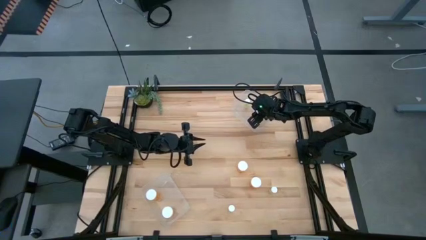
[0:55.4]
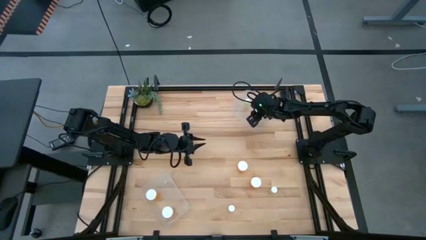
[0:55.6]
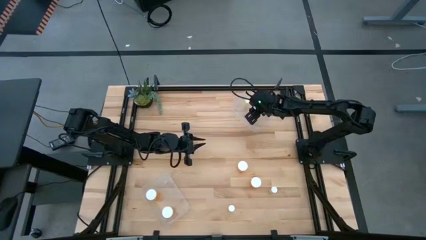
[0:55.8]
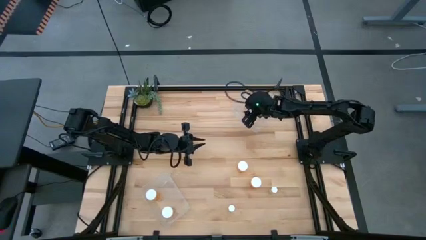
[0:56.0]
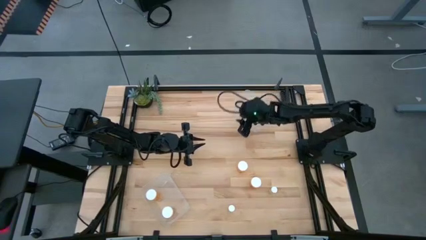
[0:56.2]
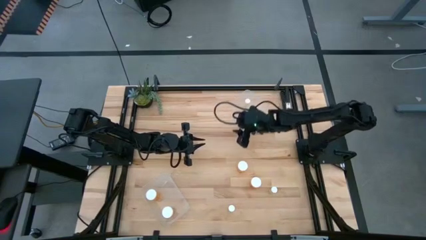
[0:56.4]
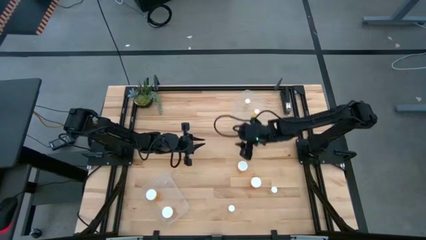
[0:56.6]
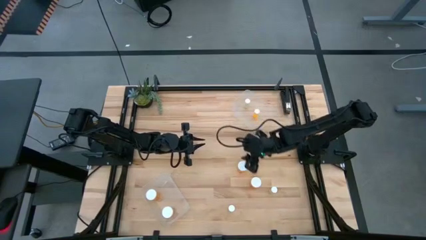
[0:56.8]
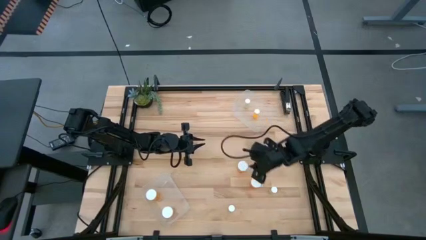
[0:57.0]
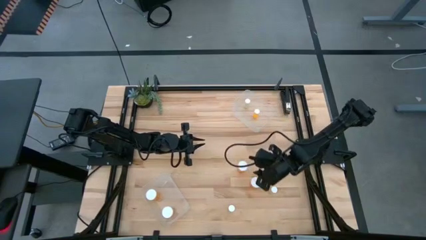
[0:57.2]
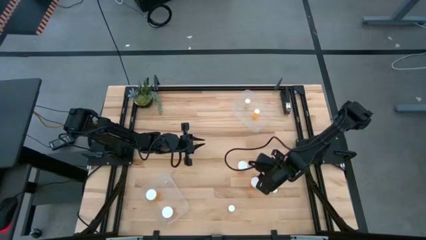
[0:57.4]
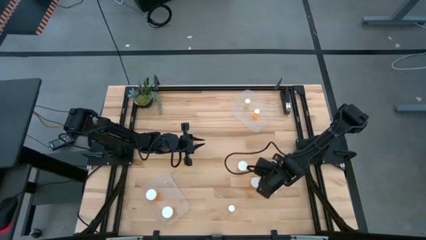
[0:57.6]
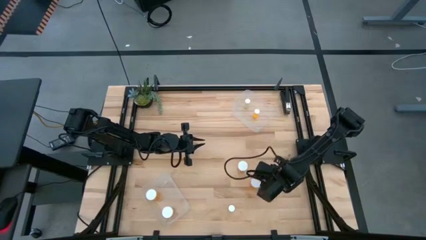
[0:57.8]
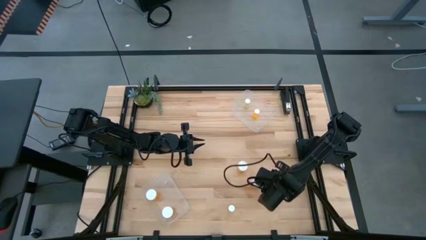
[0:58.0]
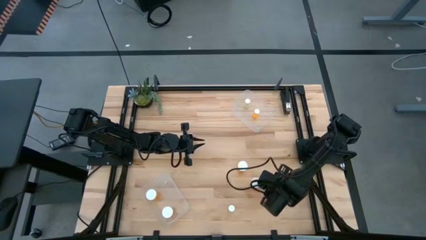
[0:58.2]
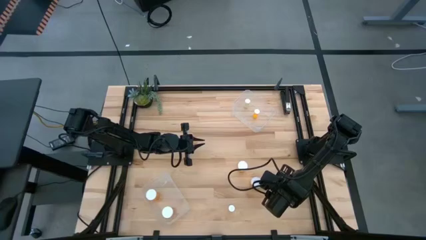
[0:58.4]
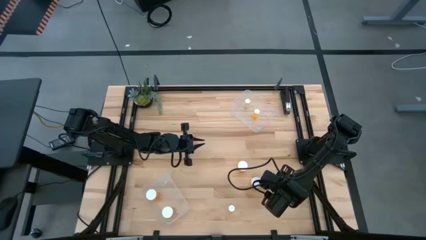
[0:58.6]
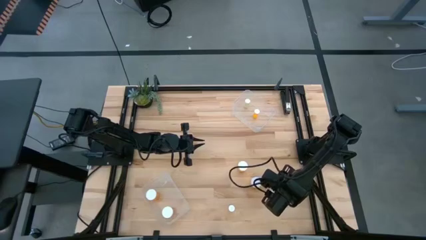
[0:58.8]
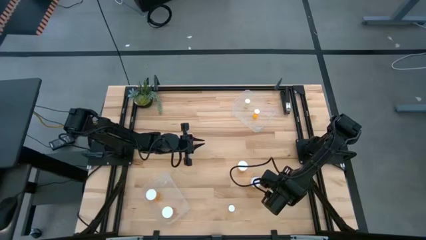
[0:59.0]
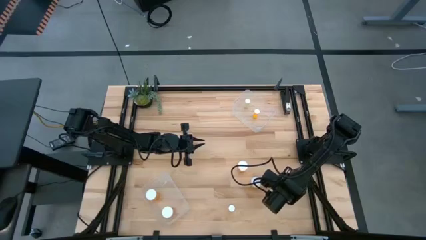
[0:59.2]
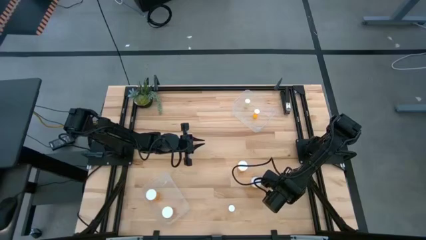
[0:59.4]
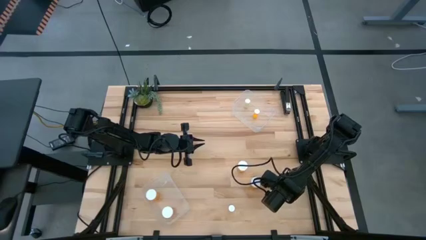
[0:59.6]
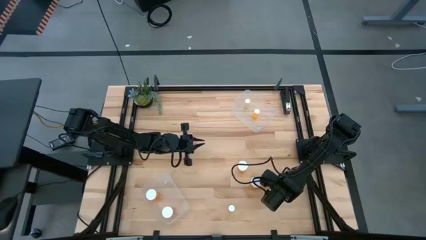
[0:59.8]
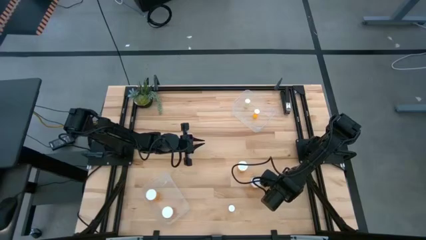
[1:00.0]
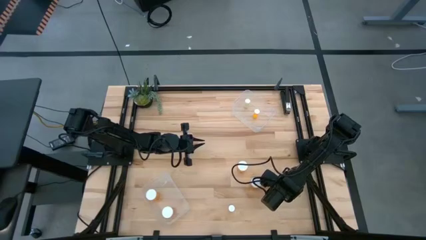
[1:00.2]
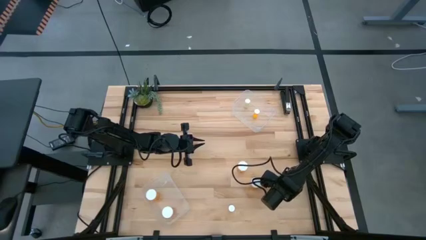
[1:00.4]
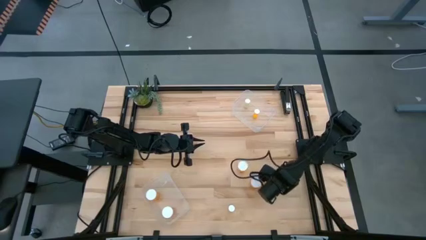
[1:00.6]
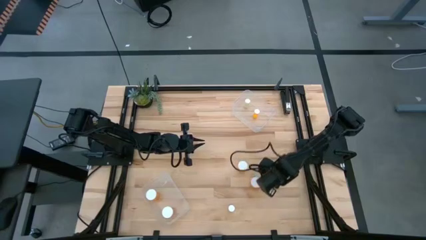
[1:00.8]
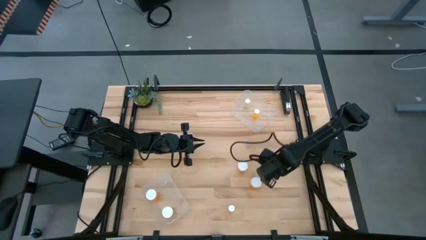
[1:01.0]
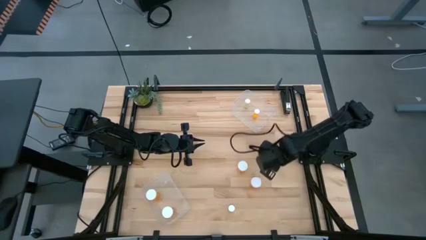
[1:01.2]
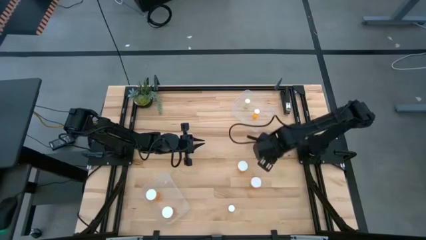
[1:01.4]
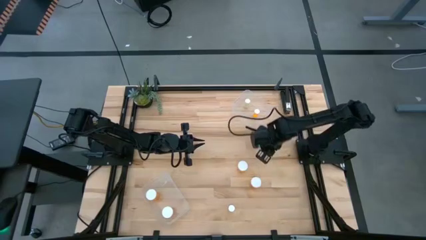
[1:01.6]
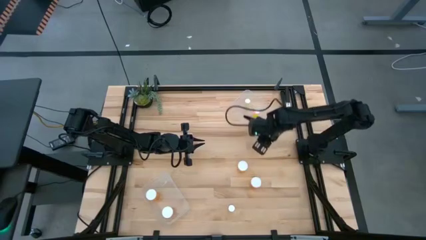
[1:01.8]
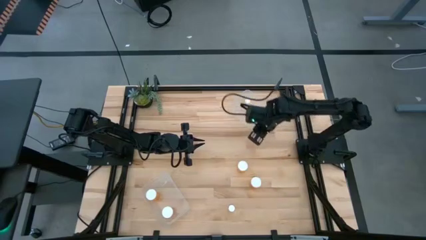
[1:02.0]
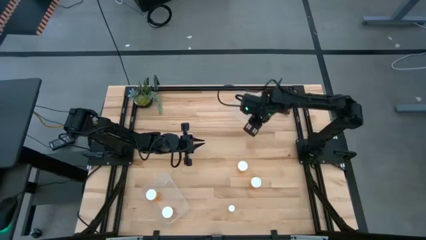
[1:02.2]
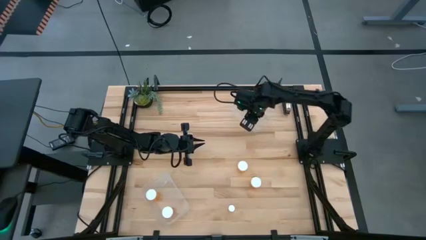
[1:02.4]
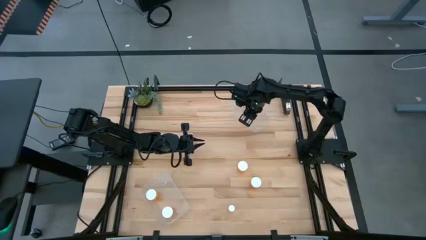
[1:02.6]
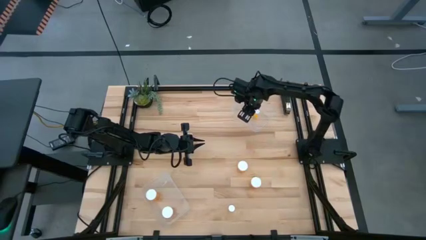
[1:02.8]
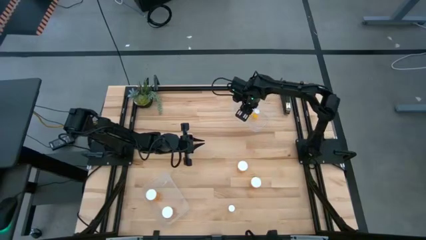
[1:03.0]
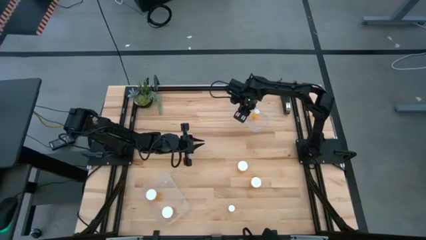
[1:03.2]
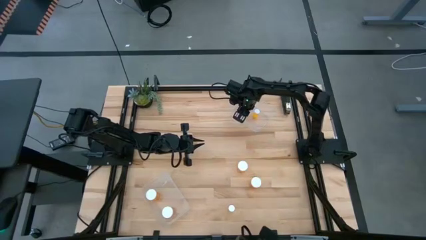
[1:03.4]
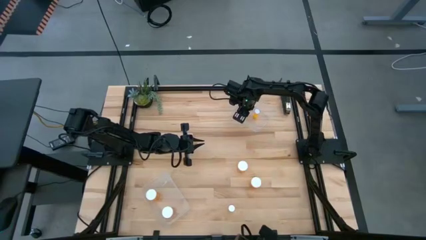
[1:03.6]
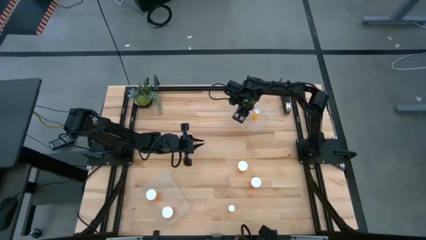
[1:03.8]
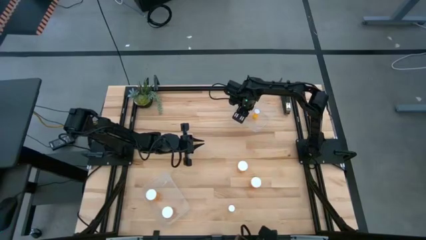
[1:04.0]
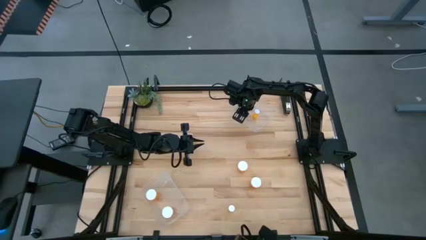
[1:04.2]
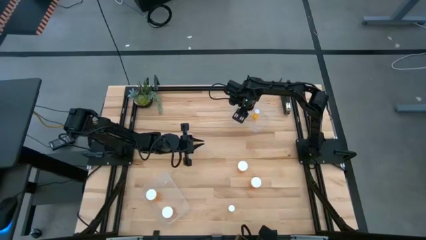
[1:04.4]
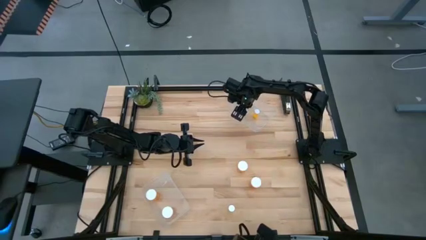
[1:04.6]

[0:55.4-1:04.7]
Task: Pick and place medicine bottles into bin by pill shape (circle, oval)
Put the small yellow pill bottle into the top transparent bin

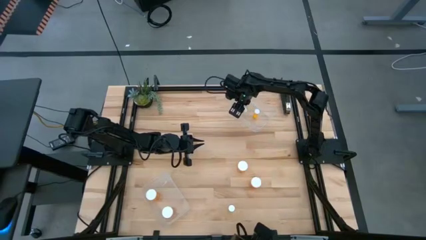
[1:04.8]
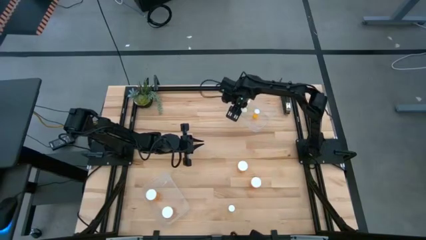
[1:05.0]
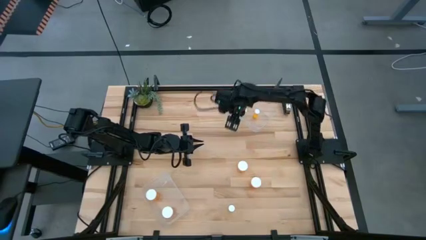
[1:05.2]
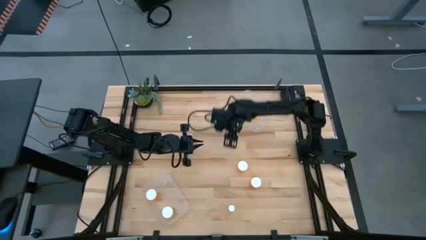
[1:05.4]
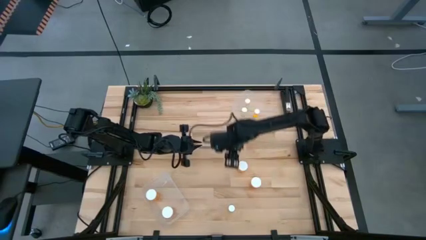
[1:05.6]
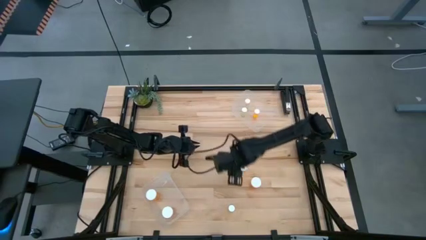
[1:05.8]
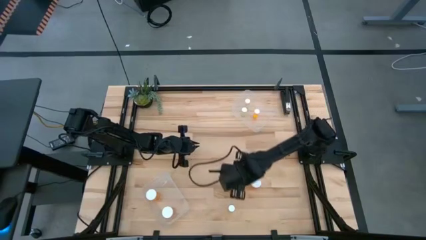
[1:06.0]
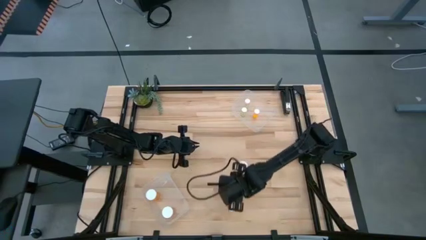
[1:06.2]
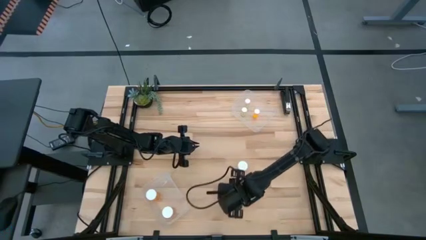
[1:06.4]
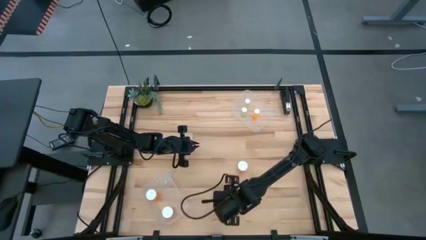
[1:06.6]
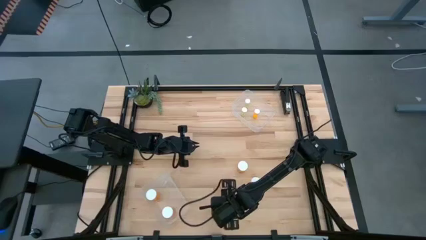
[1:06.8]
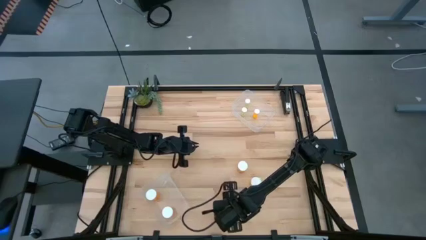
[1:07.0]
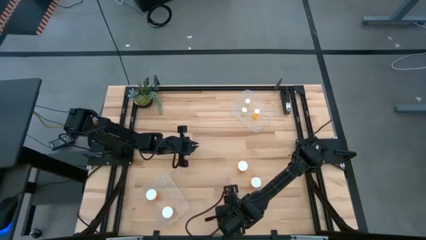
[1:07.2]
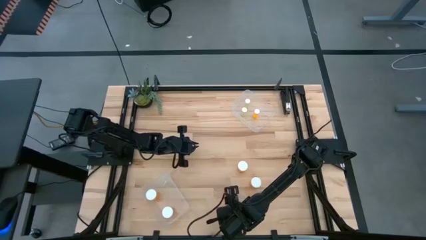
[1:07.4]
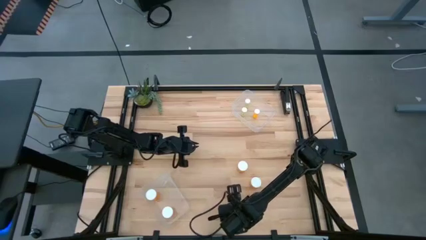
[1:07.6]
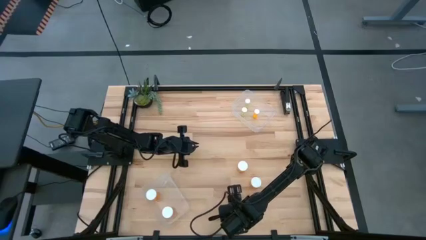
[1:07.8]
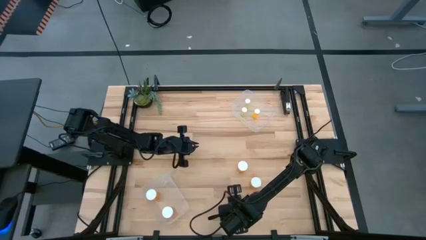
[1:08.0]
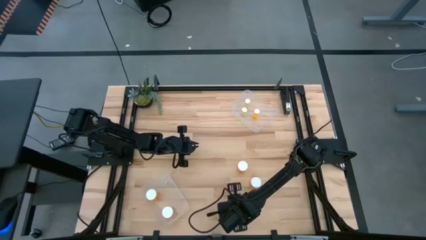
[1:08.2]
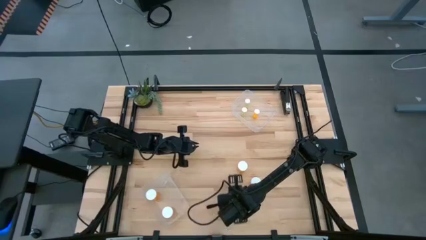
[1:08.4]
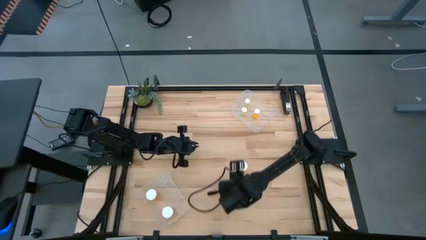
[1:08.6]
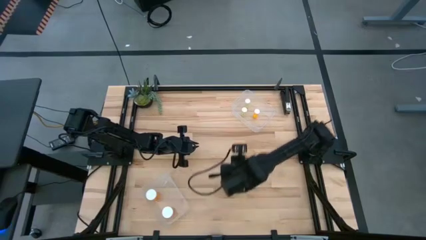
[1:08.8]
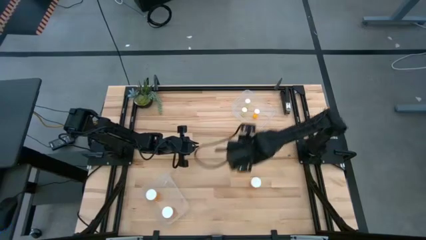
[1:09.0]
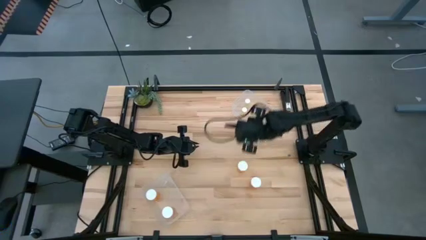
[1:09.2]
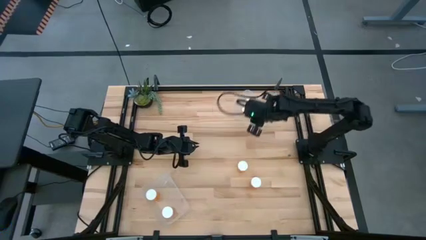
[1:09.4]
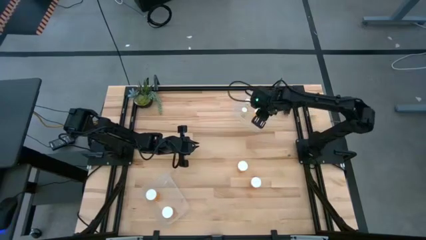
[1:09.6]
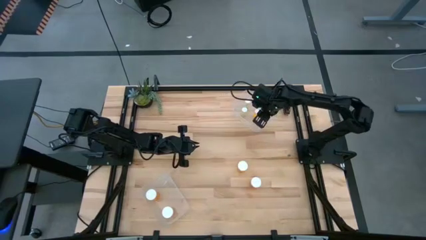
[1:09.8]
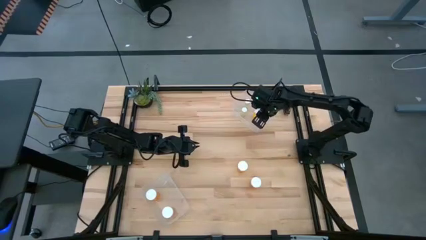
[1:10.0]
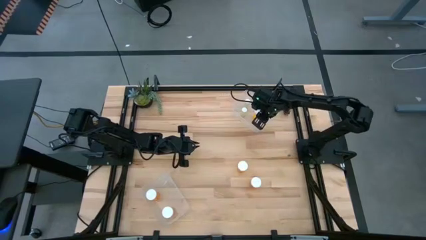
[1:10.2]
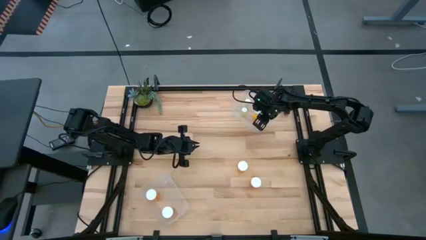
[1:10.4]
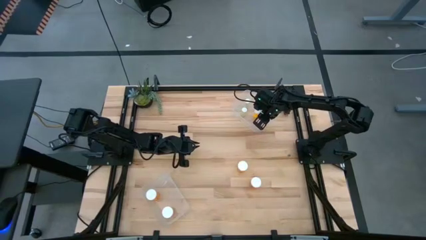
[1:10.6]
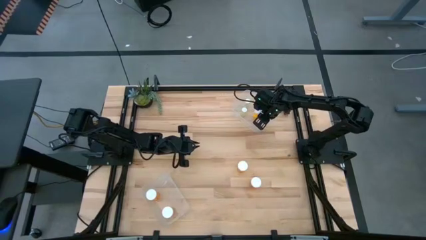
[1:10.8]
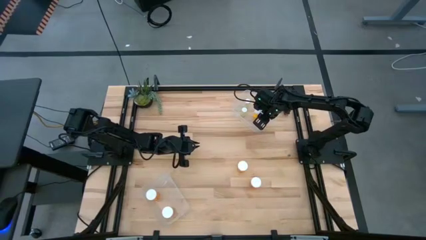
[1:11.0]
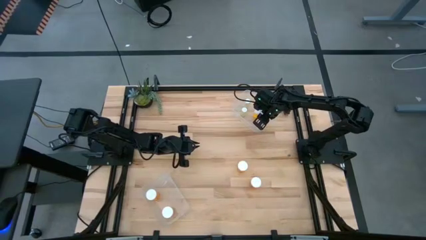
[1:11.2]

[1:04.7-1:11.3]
Put the small yellow pill bottle into the top transparent bin
